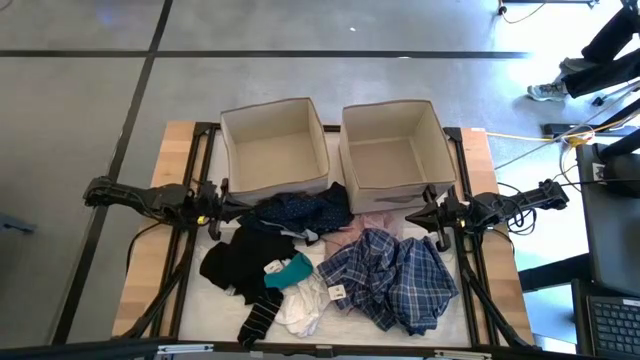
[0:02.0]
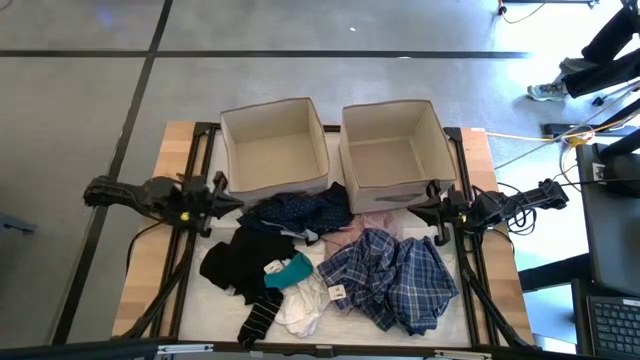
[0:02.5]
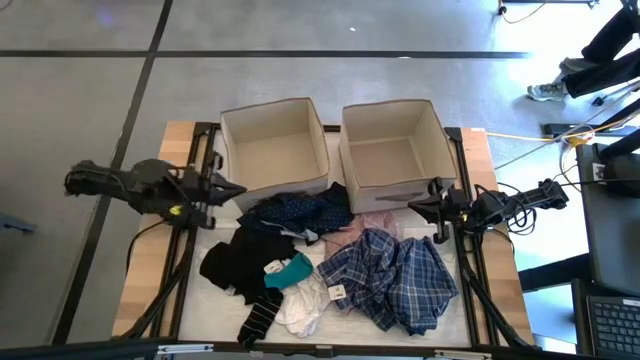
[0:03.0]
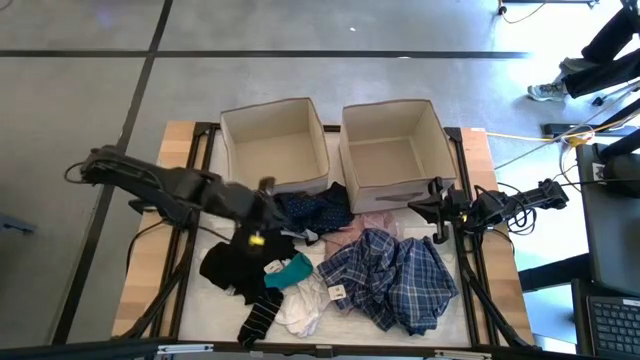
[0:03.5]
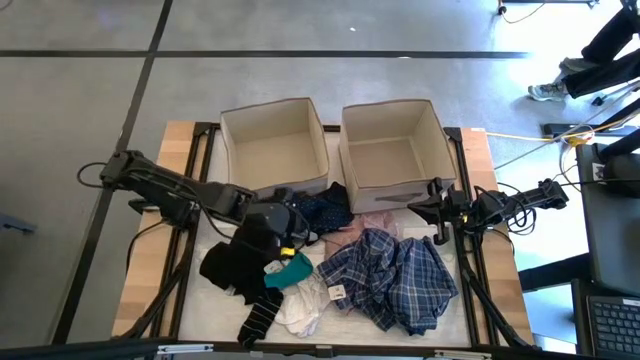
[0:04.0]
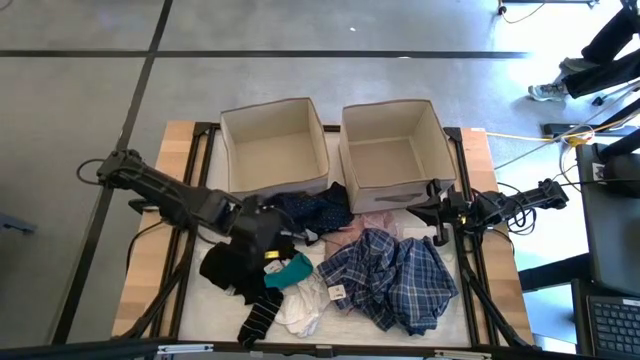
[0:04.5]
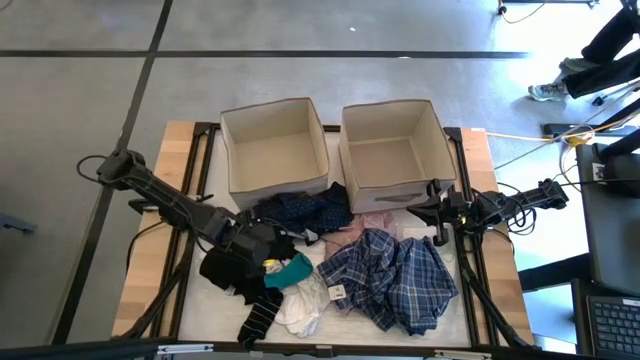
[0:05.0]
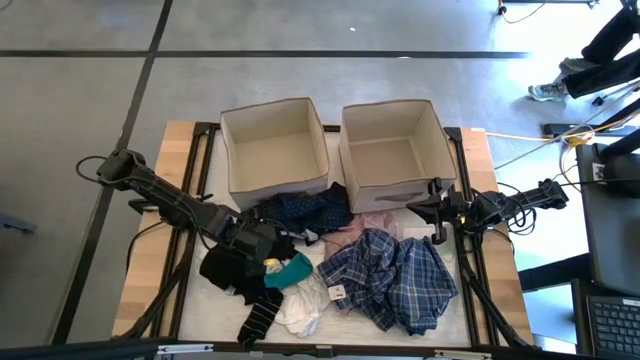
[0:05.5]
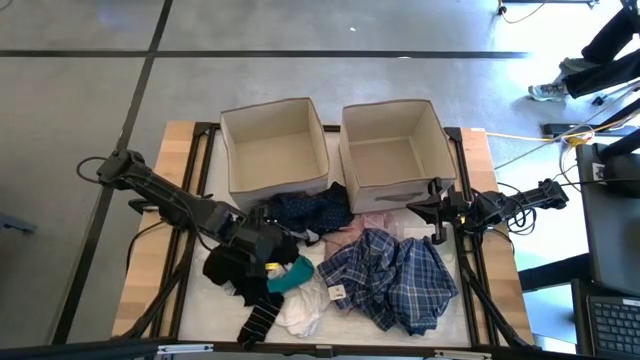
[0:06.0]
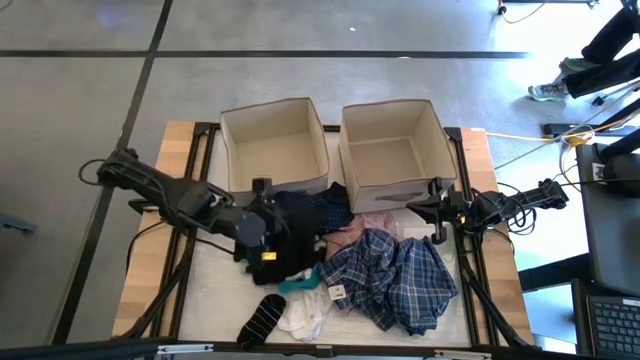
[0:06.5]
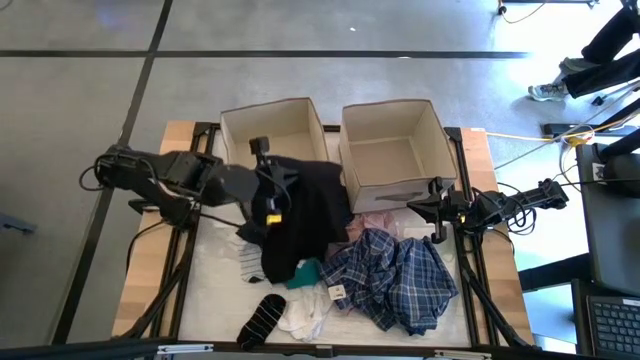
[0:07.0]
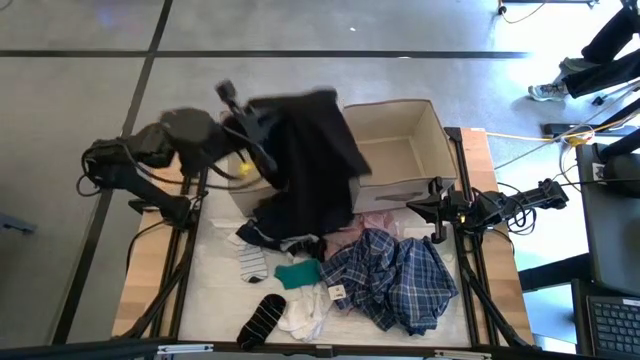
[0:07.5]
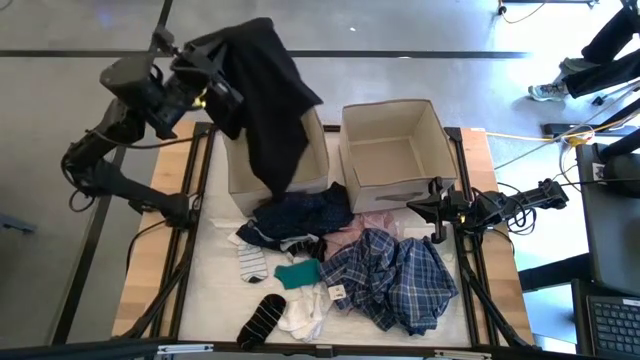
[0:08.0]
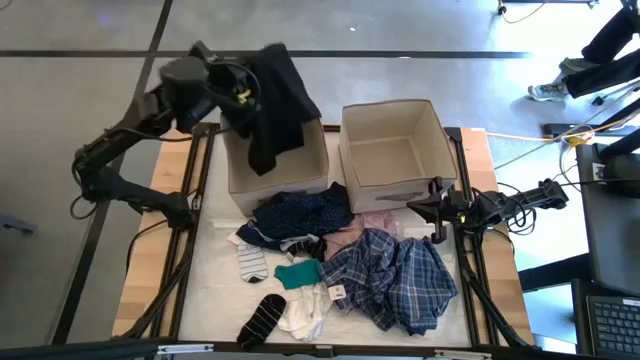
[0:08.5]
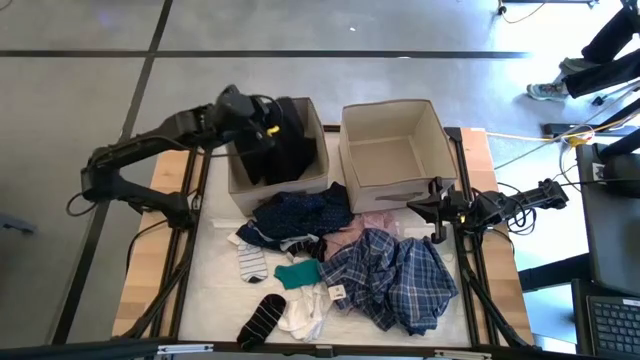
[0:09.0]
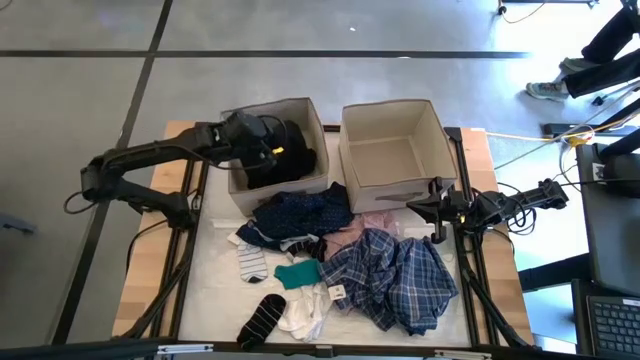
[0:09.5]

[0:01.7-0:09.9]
Task: Sort clothes
Put the black shirt into the left laundry organizer

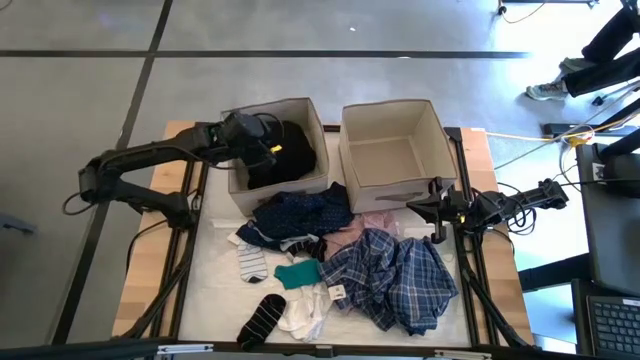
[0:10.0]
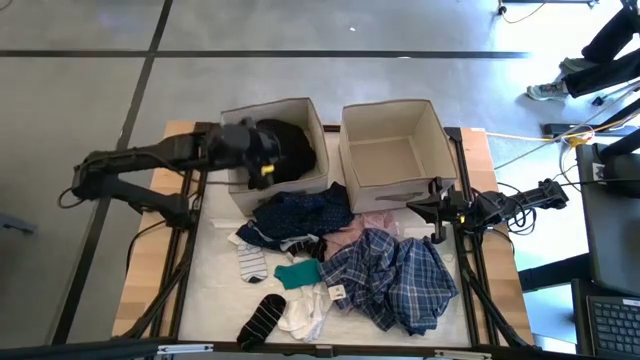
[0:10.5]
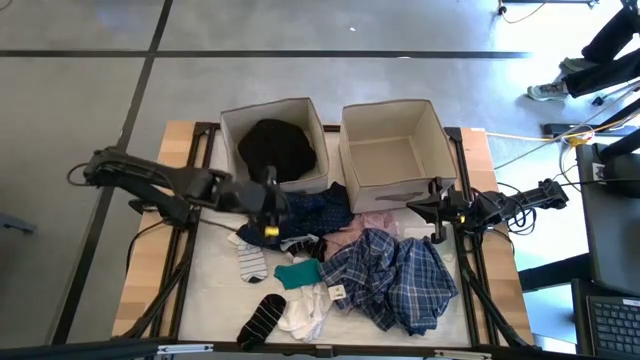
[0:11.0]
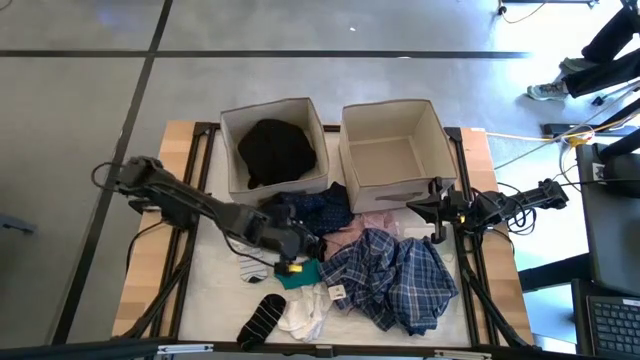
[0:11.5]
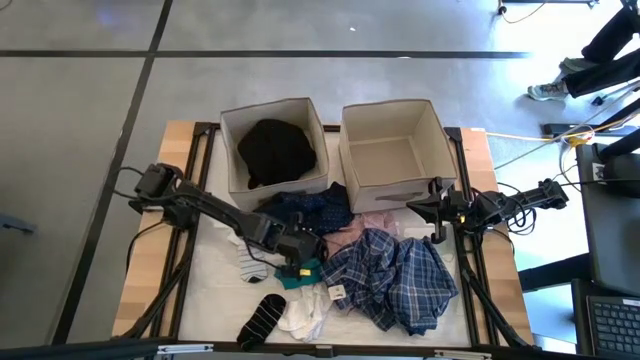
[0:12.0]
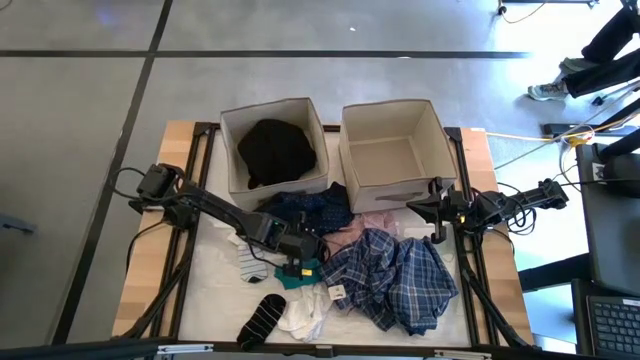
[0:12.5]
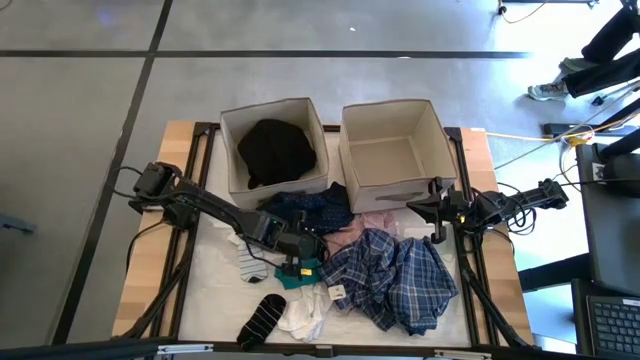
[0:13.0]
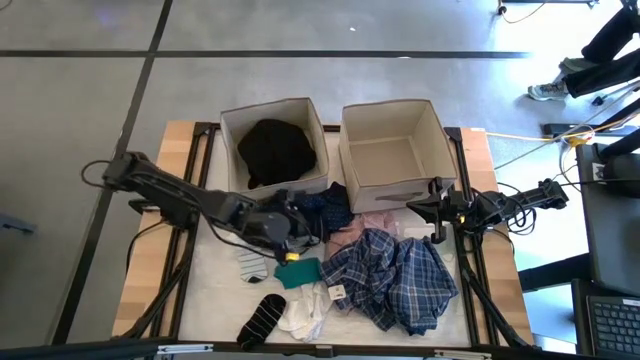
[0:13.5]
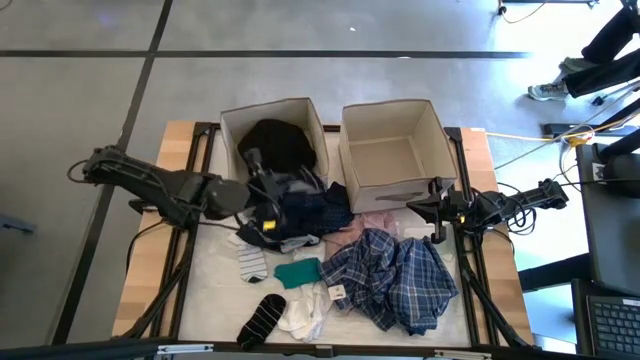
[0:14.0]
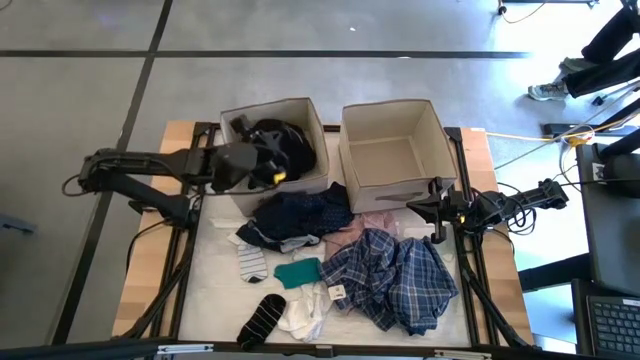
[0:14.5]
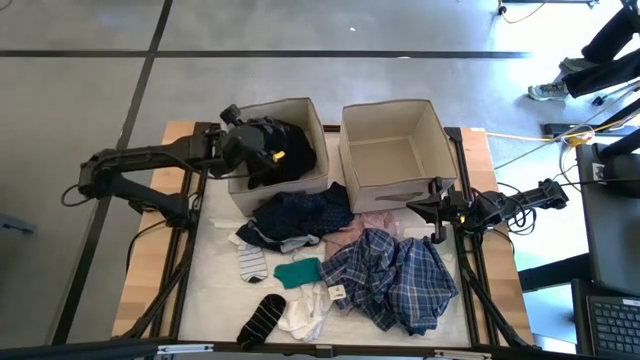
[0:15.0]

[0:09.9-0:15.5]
Put the black sock into the left laundry organizer

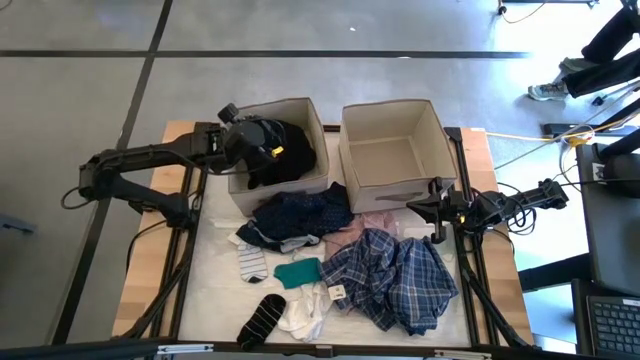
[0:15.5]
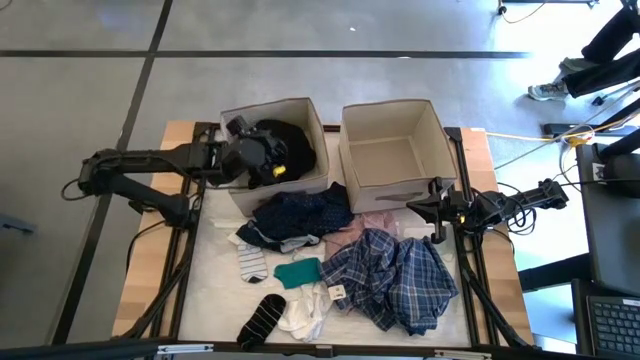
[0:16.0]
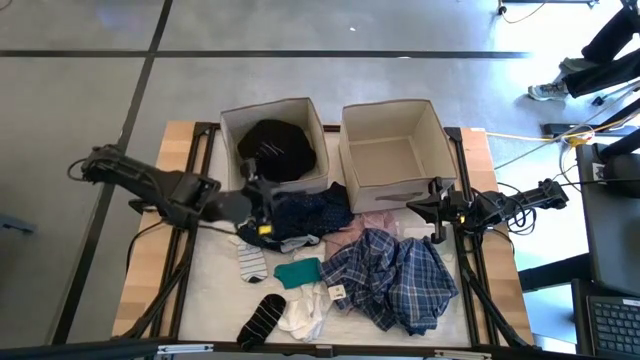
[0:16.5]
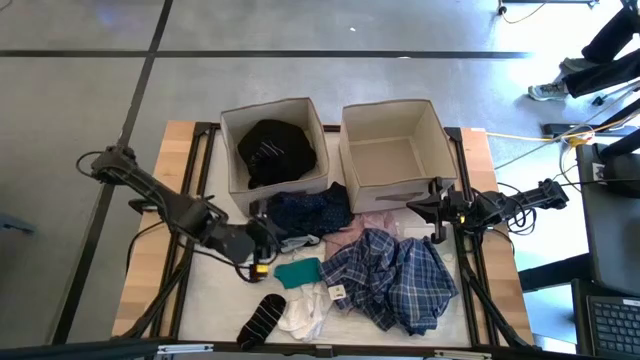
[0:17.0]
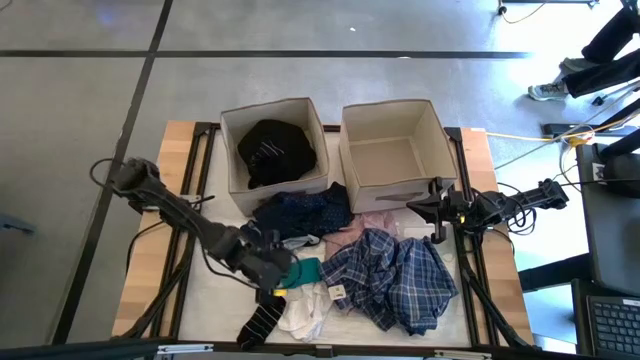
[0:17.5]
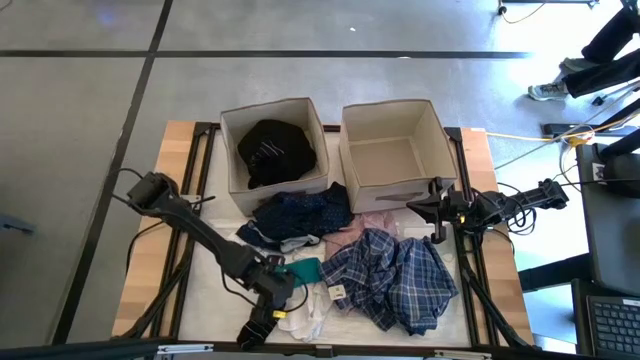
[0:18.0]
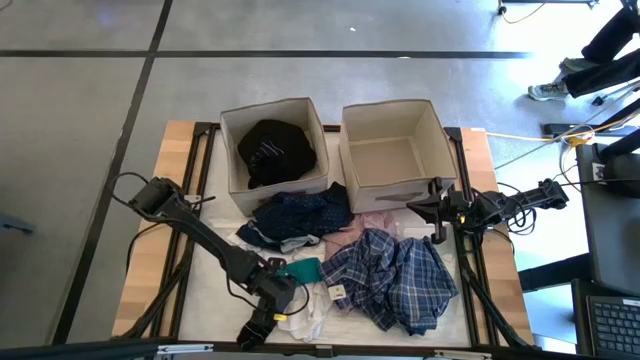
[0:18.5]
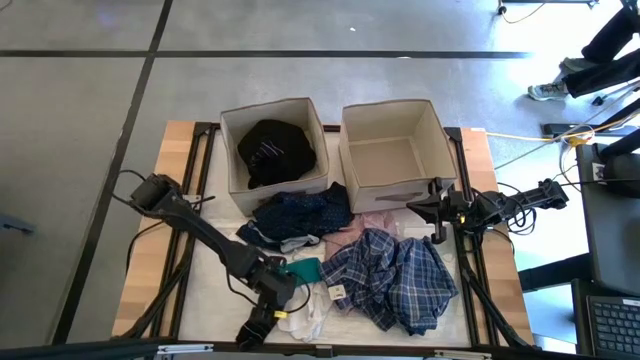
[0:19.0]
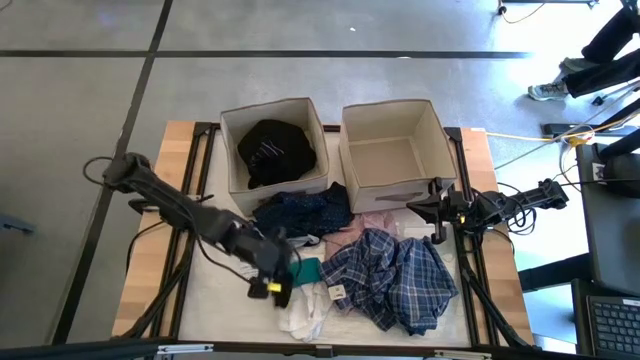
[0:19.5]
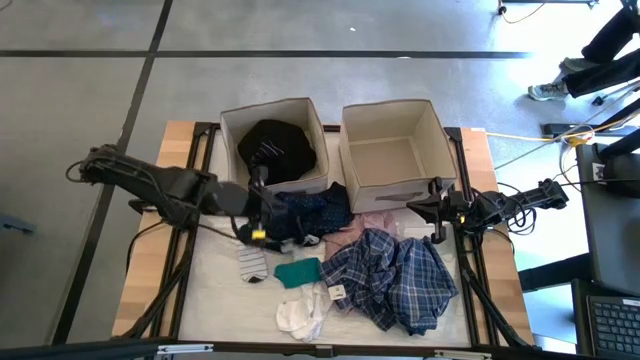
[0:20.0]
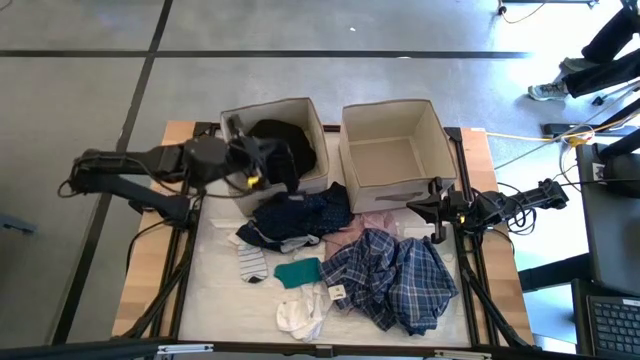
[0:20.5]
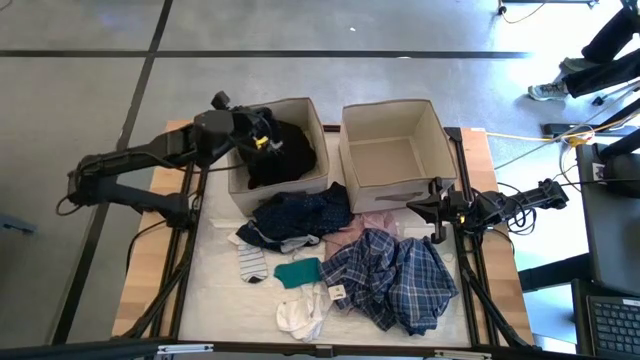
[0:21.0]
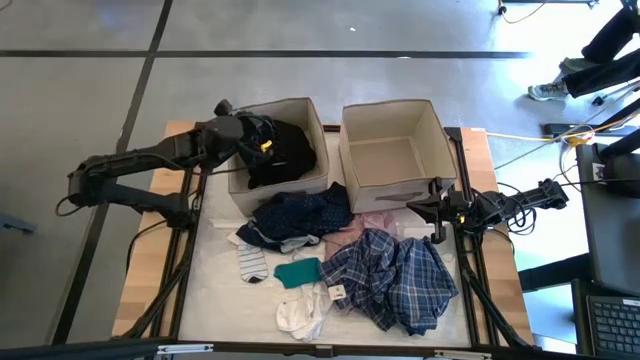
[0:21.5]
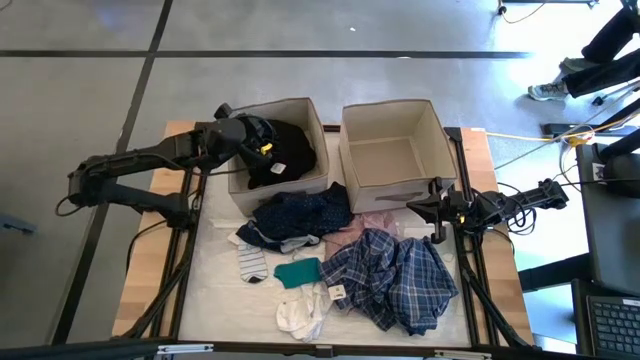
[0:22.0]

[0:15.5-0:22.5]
Put the black sock into the left laundry organizer
